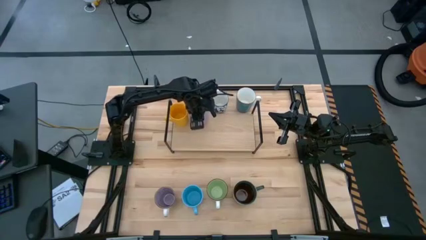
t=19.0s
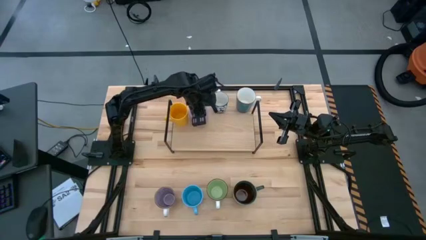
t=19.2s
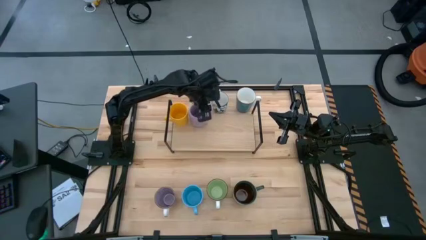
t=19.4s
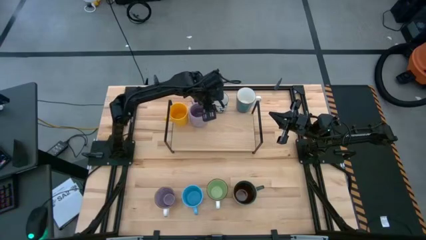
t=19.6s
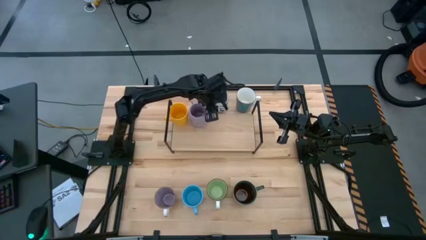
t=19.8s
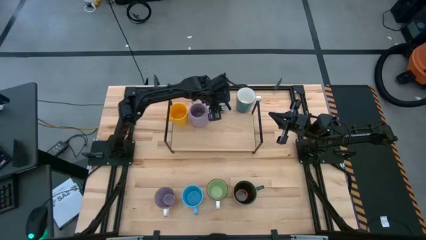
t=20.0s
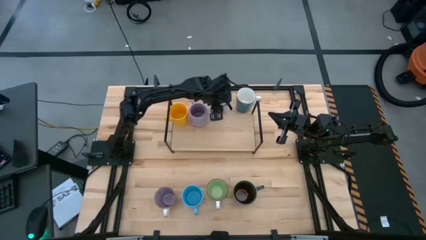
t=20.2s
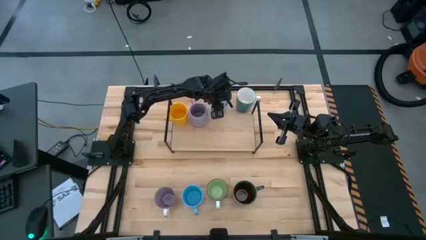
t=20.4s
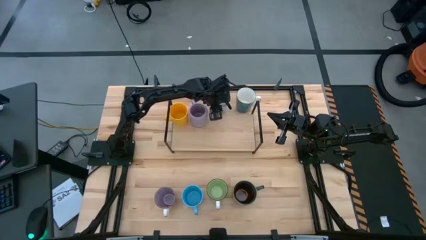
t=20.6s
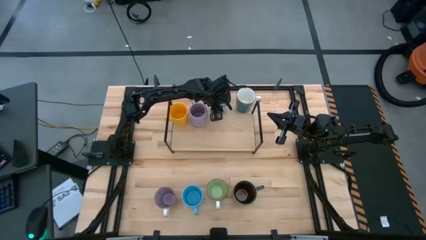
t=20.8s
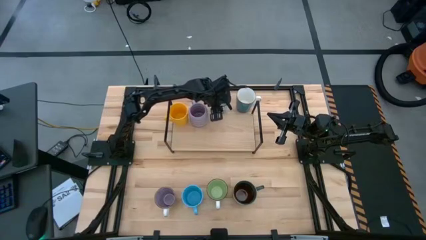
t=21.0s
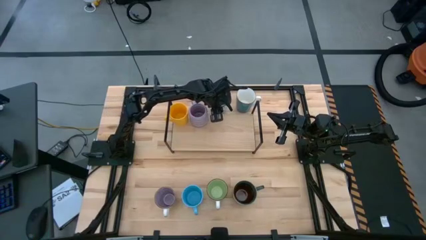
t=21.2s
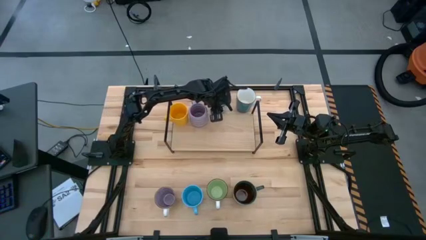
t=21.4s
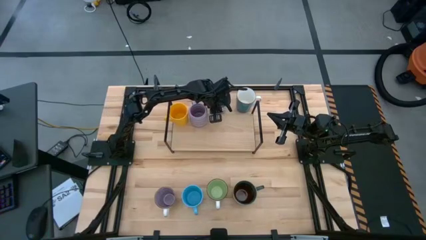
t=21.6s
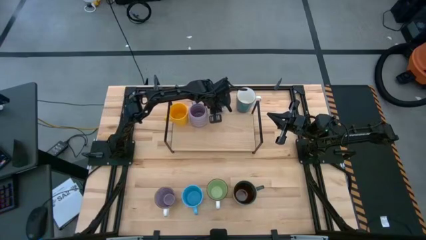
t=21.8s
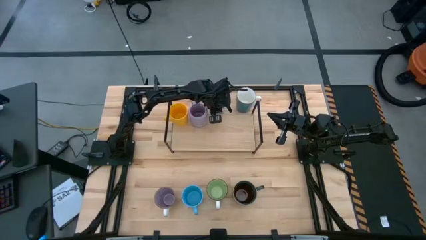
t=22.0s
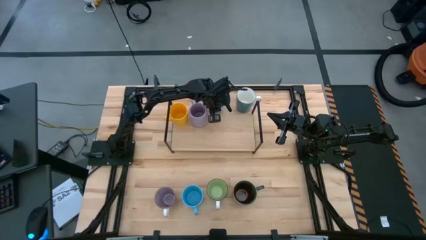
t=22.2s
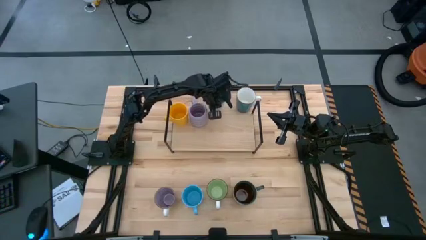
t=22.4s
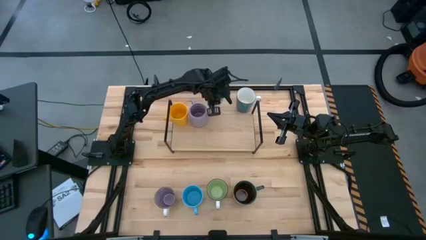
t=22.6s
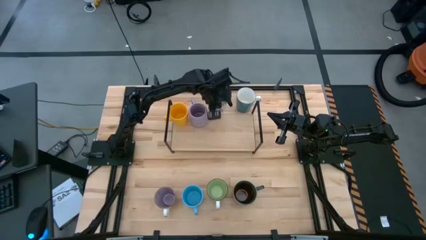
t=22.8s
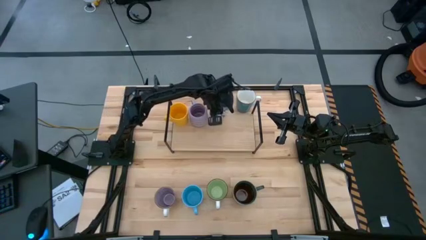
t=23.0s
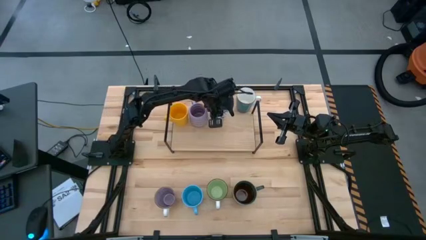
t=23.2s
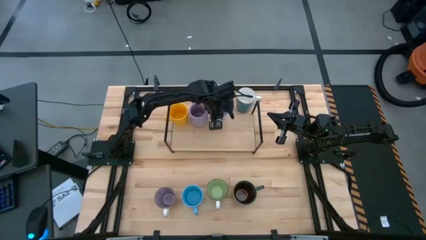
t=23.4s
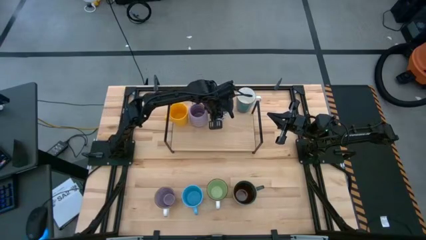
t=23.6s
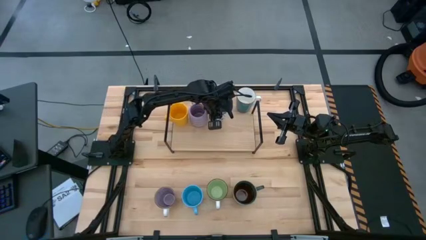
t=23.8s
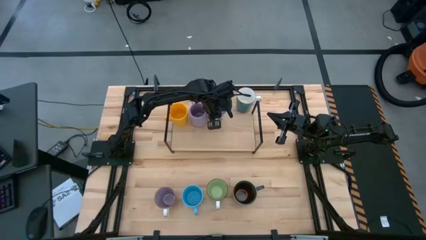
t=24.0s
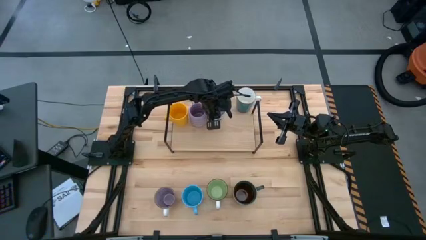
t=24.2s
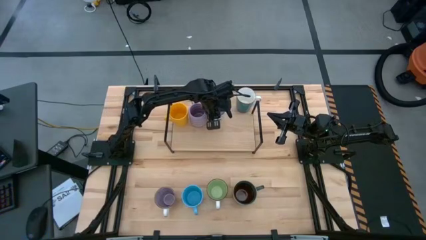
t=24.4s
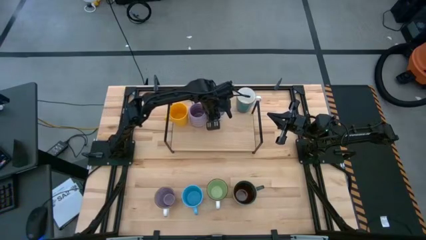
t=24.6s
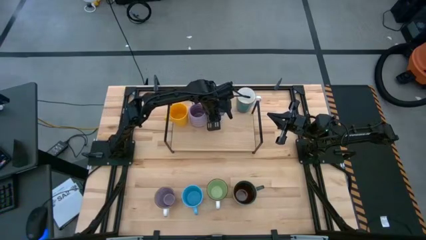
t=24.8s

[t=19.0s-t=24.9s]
Task: Place coffee mugs
Put the white mug on the shelf

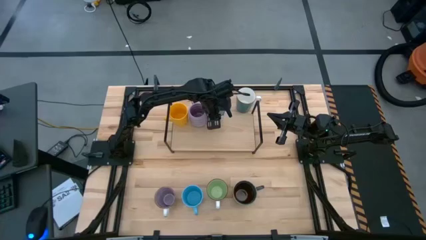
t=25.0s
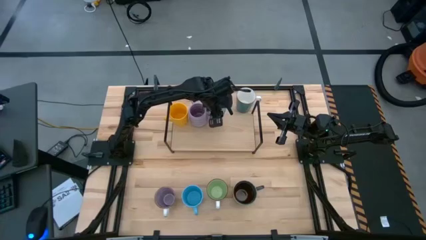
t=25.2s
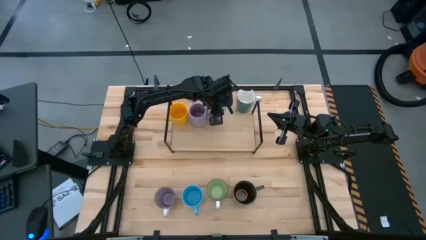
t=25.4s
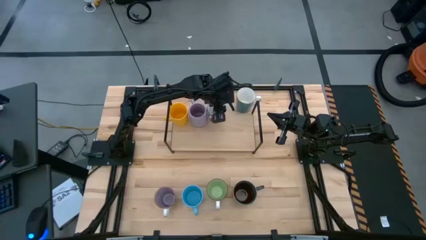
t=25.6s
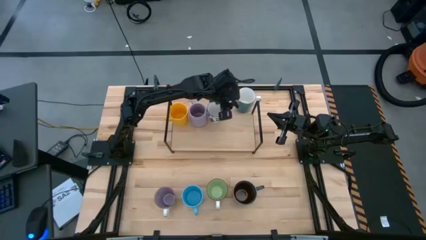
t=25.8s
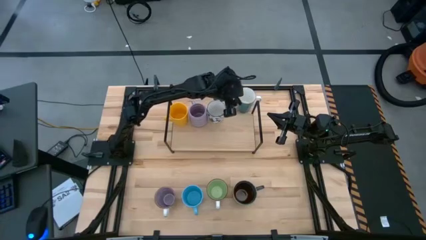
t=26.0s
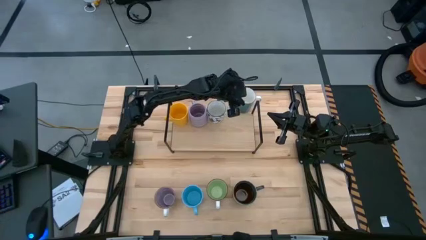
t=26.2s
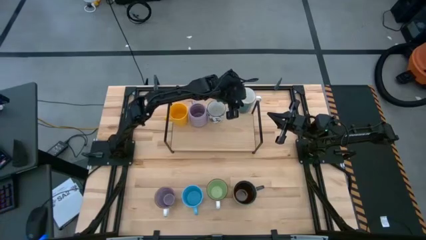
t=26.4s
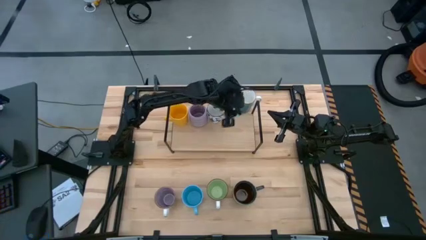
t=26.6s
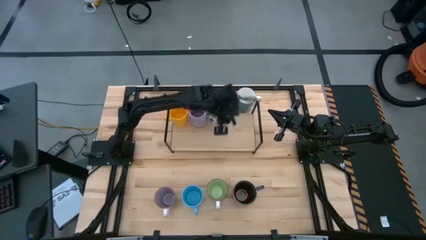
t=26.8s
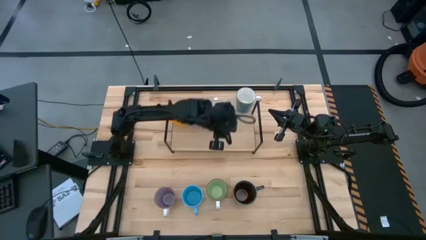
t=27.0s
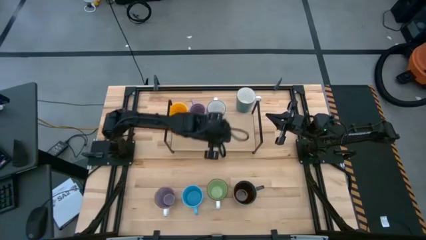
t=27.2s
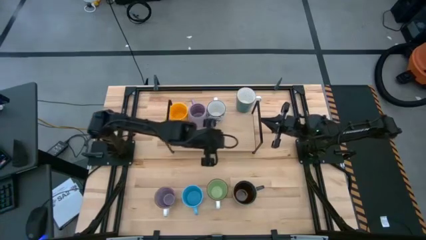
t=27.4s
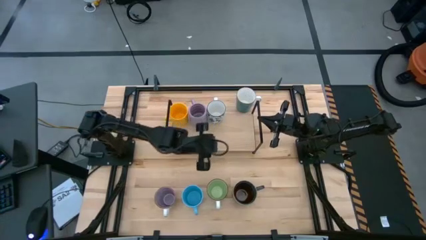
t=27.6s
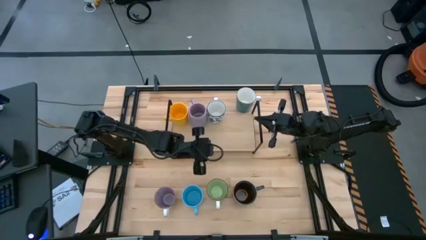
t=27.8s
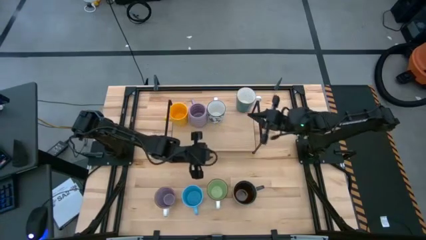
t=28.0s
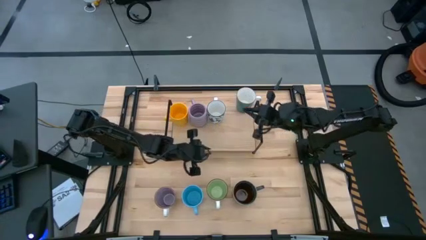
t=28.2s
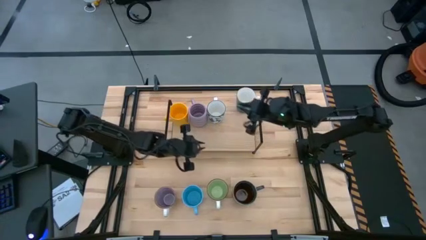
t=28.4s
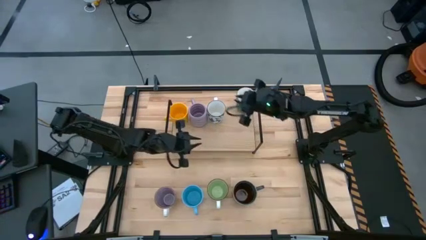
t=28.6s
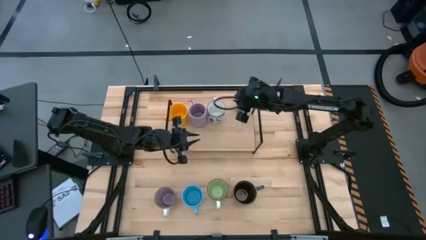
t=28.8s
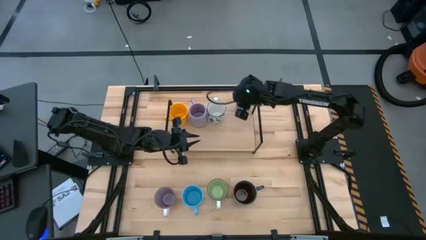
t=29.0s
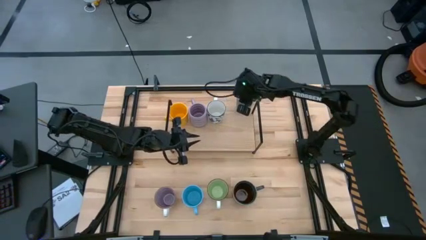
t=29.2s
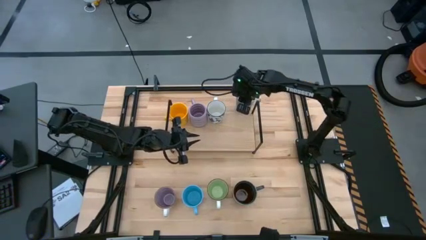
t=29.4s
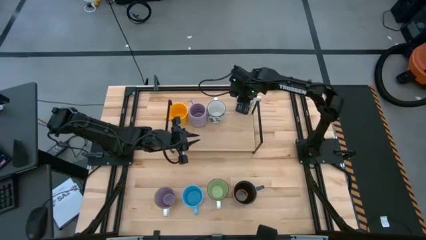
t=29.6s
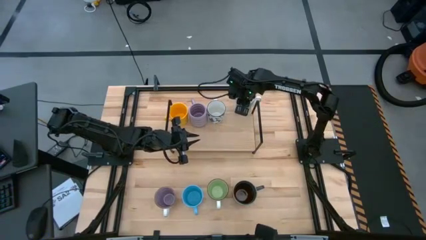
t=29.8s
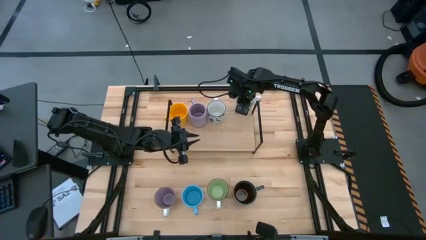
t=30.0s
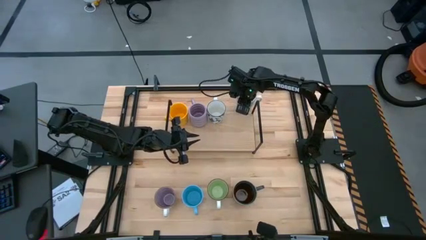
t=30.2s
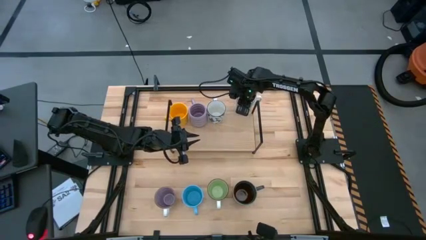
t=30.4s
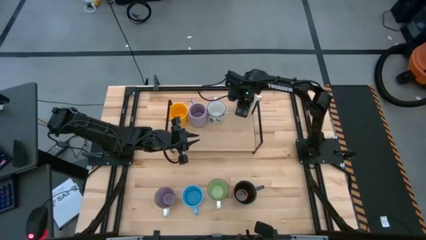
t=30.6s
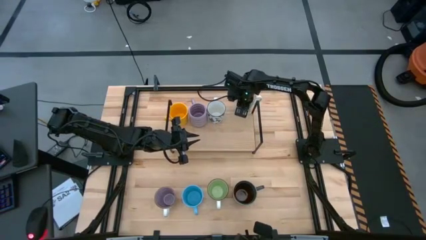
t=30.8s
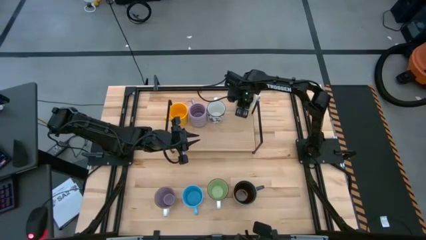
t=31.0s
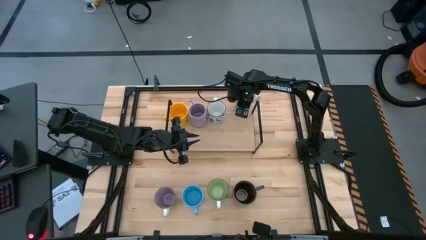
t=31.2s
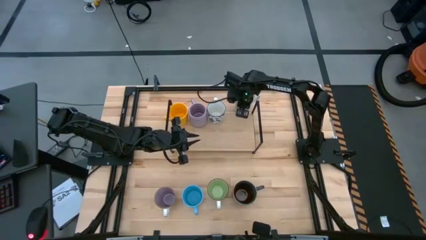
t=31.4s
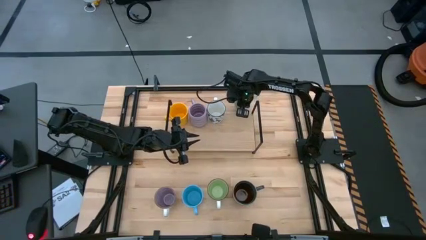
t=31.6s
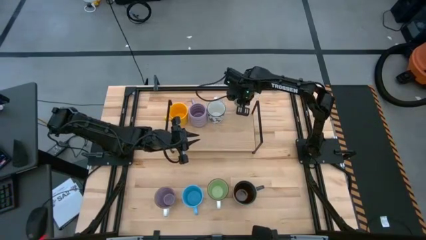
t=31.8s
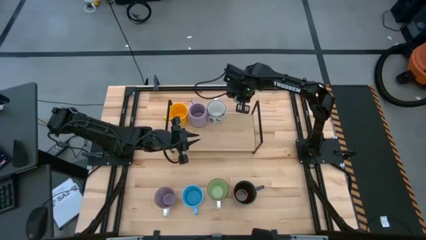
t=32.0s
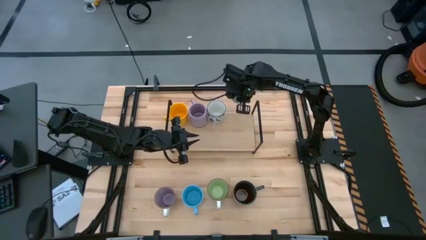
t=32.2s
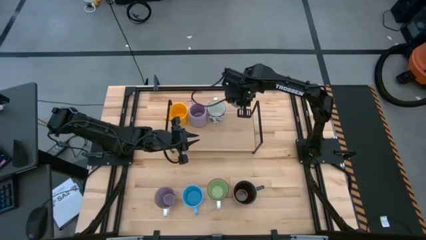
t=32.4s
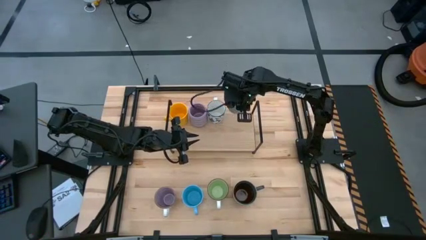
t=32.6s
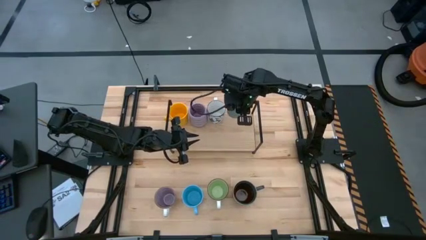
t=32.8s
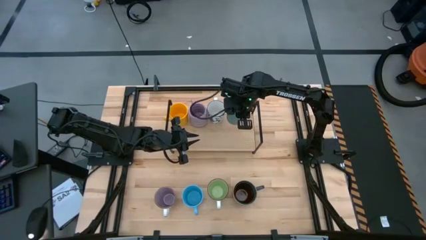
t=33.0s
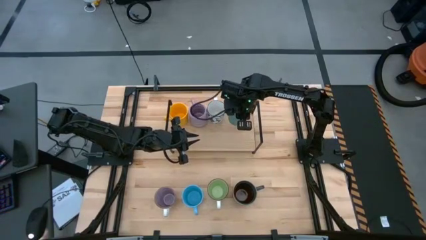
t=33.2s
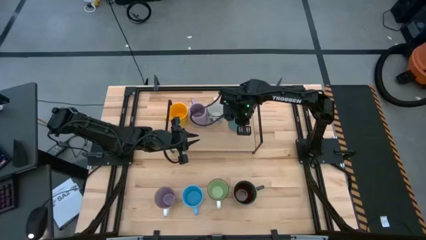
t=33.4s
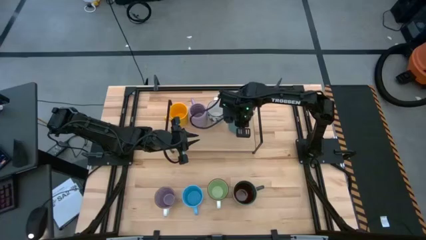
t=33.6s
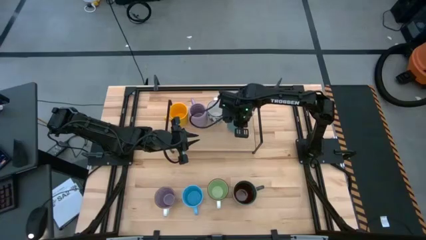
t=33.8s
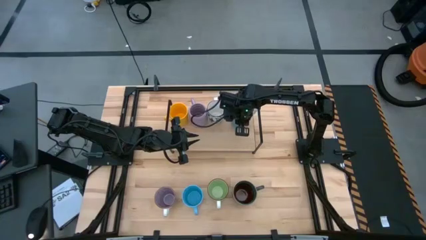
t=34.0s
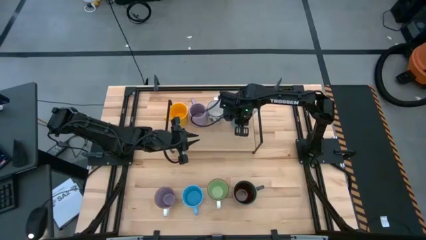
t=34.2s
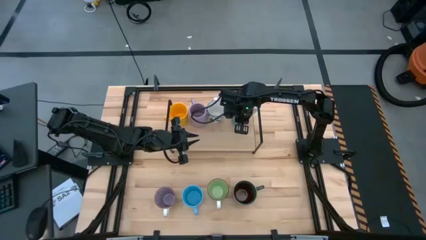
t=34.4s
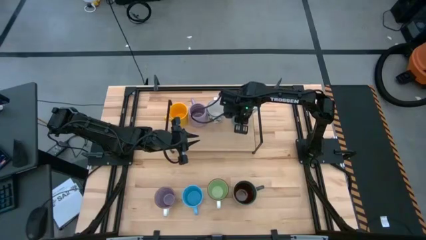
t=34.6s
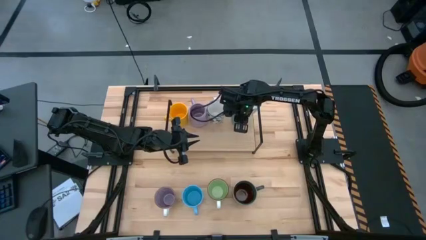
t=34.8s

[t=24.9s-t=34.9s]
Put the light blue mug on the shelf

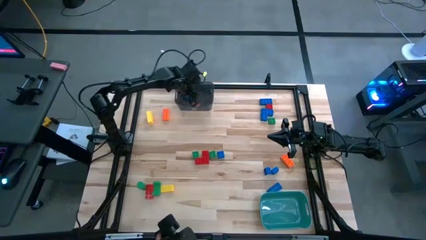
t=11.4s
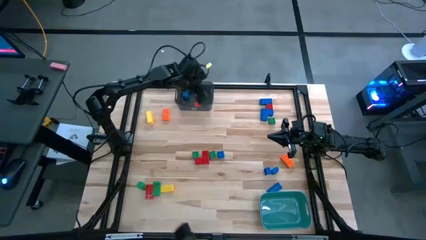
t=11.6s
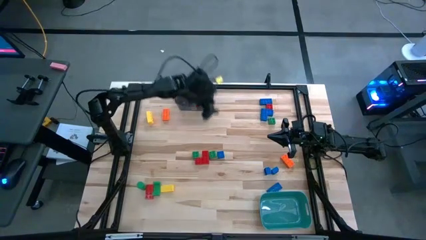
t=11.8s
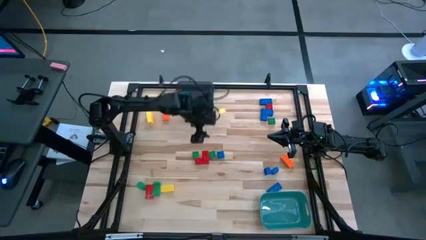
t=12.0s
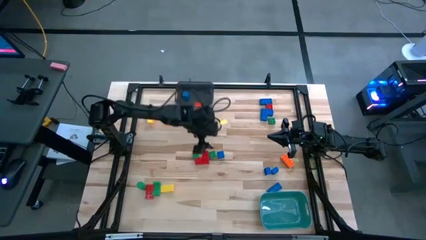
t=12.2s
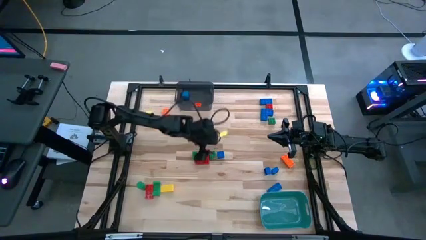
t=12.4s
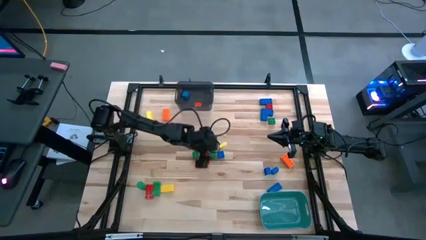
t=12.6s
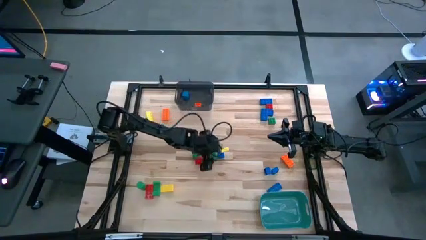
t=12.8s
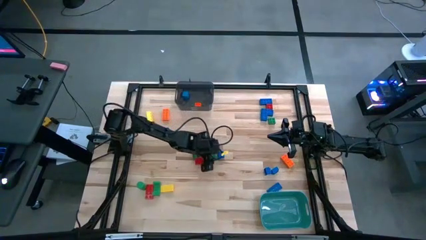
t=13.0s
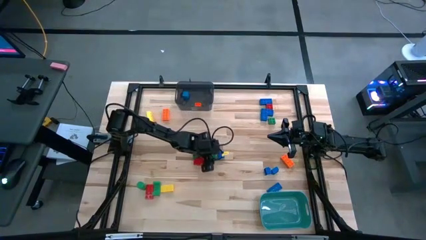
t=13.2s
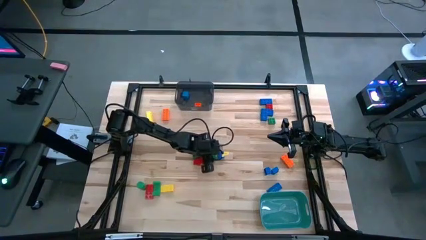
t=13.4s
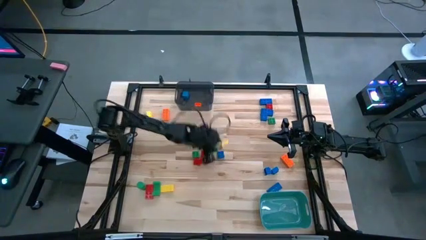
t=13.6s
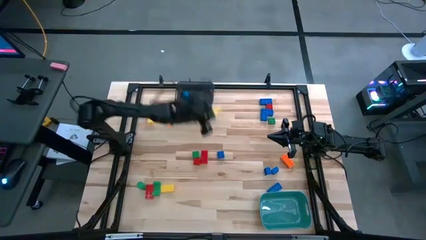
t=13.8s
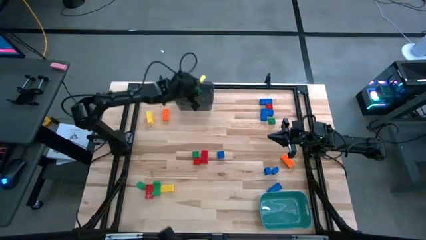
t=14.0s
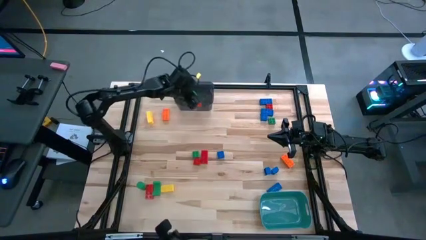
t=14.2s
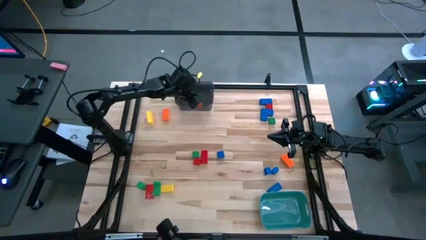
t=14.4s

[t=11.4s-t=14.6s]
Task: Sort blocks by size
Put the green game piece into the transparent black bin
